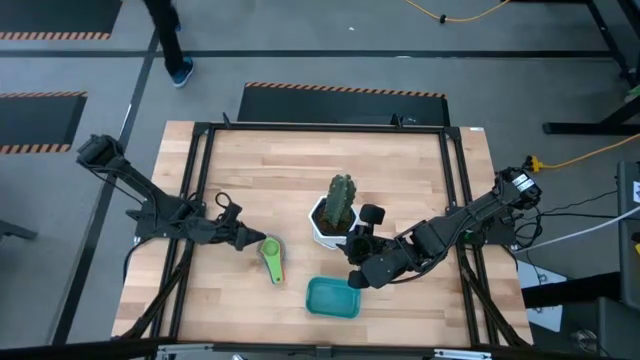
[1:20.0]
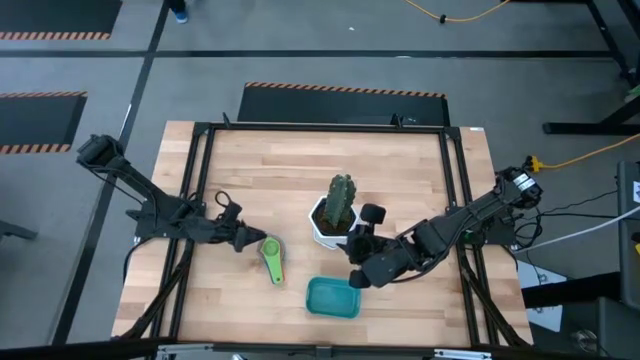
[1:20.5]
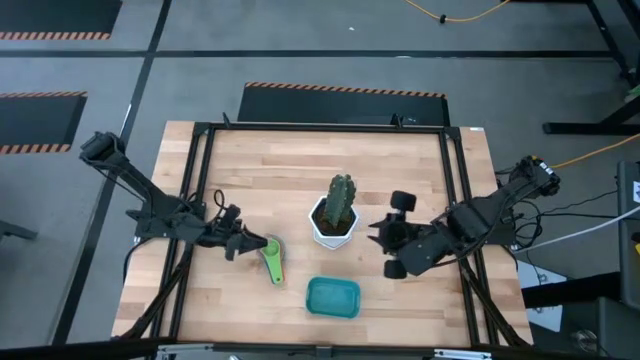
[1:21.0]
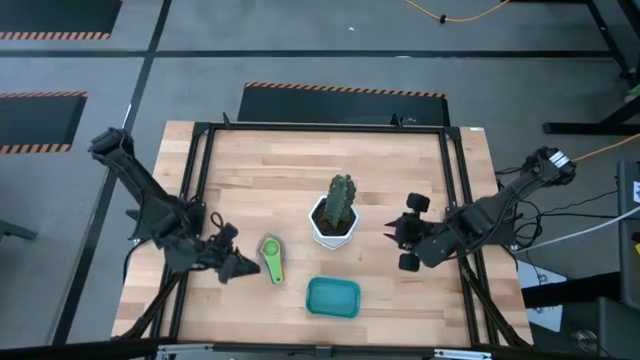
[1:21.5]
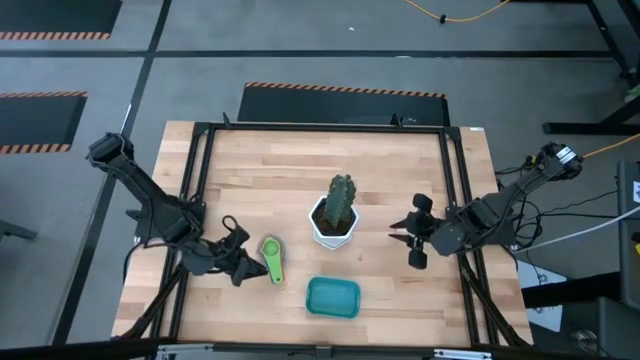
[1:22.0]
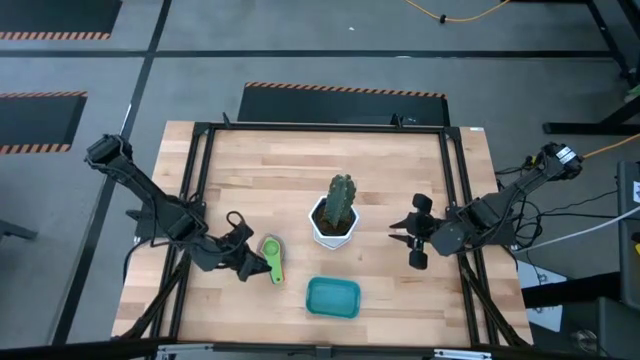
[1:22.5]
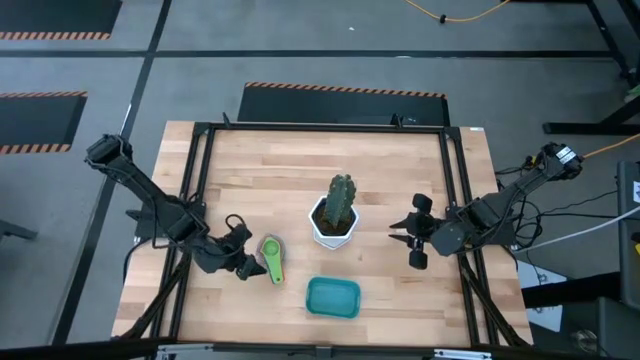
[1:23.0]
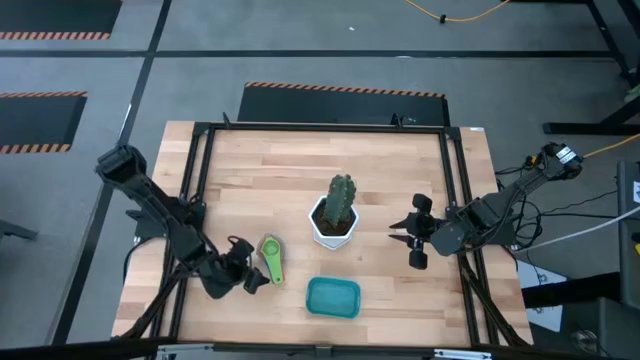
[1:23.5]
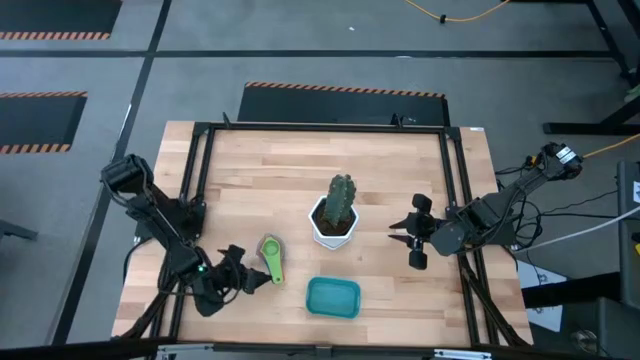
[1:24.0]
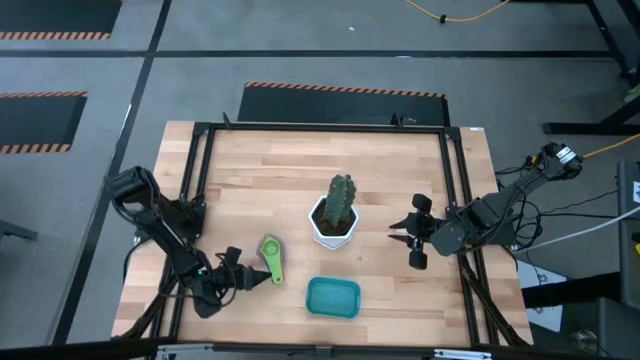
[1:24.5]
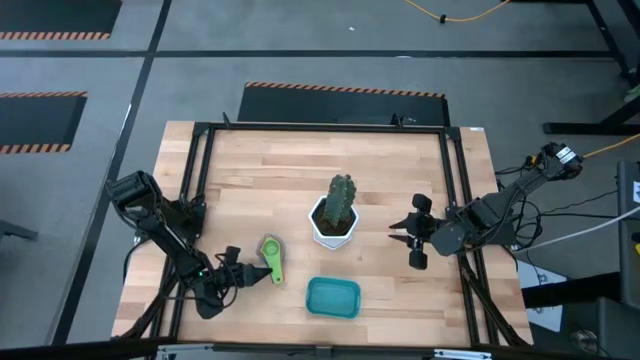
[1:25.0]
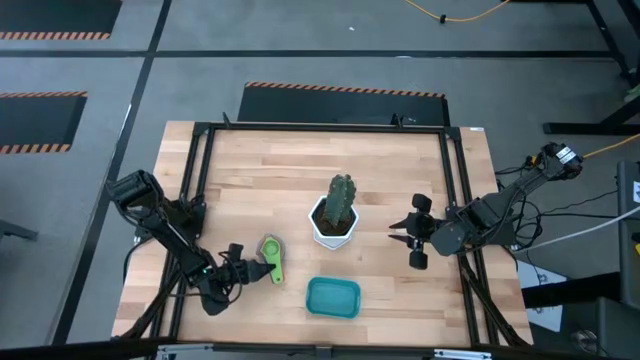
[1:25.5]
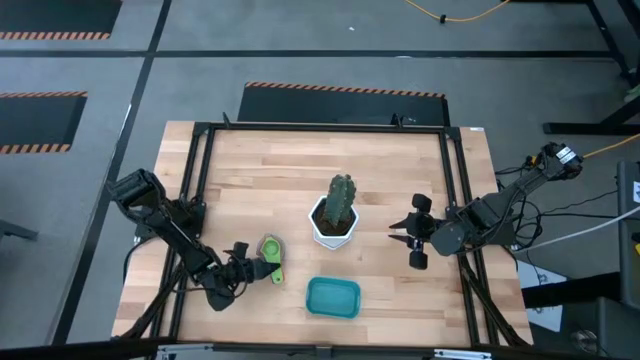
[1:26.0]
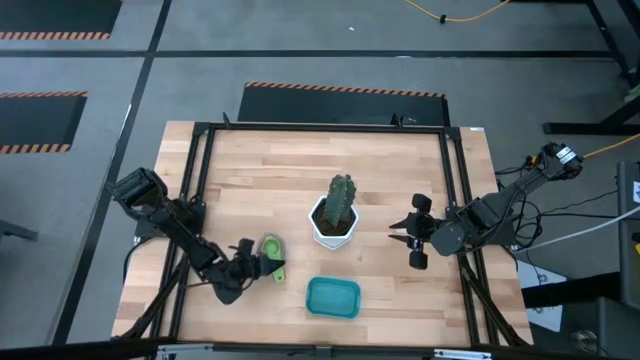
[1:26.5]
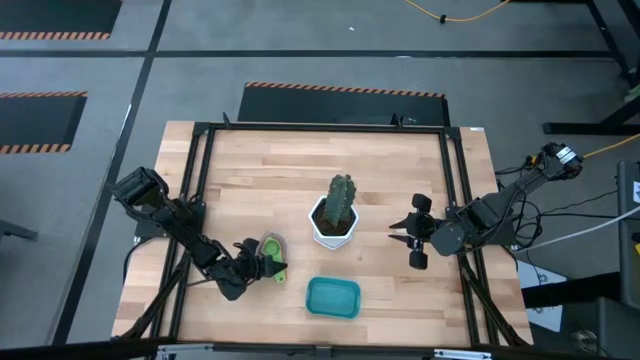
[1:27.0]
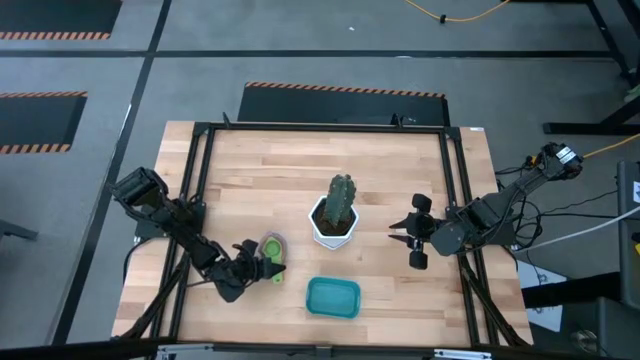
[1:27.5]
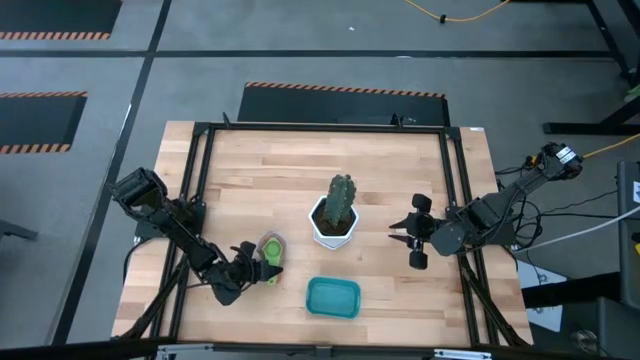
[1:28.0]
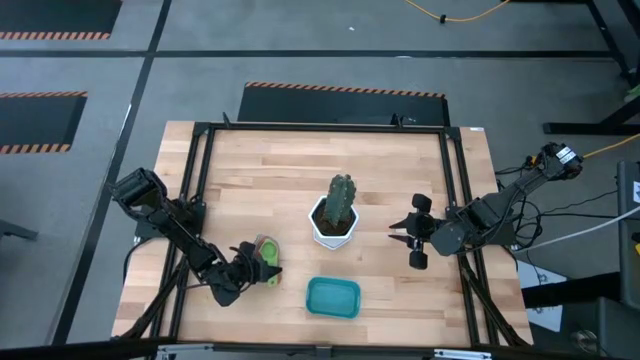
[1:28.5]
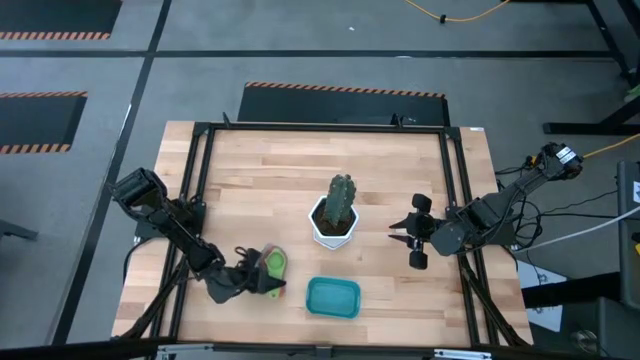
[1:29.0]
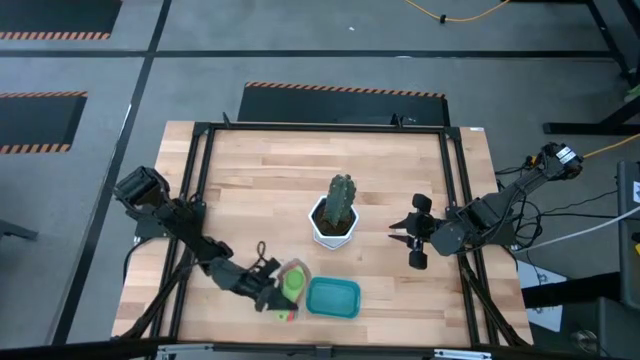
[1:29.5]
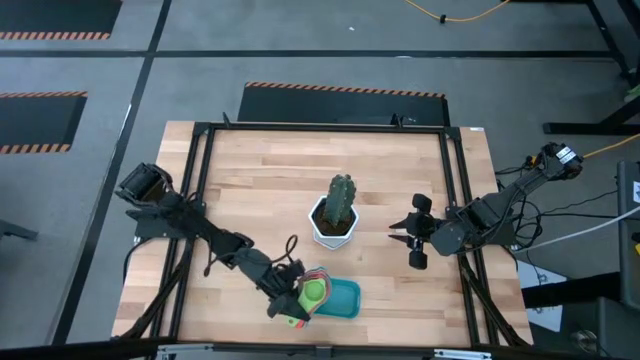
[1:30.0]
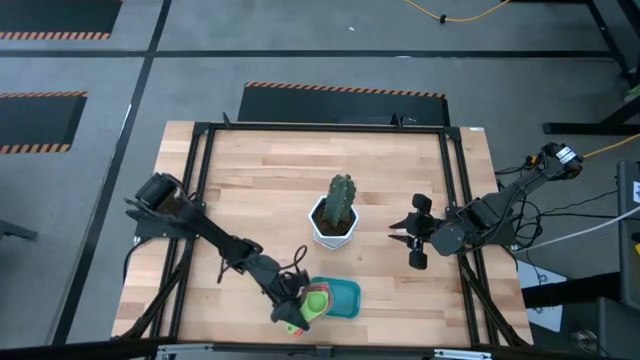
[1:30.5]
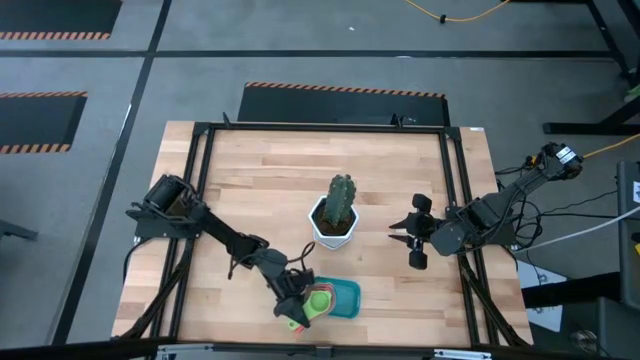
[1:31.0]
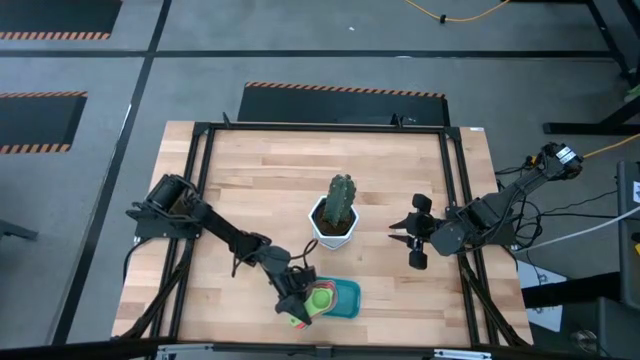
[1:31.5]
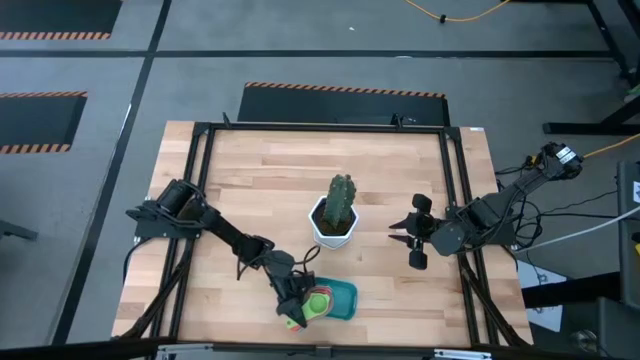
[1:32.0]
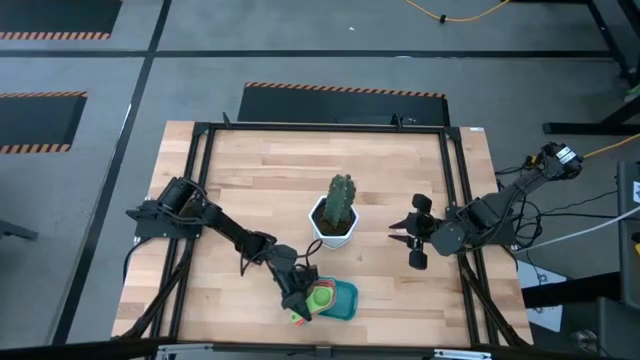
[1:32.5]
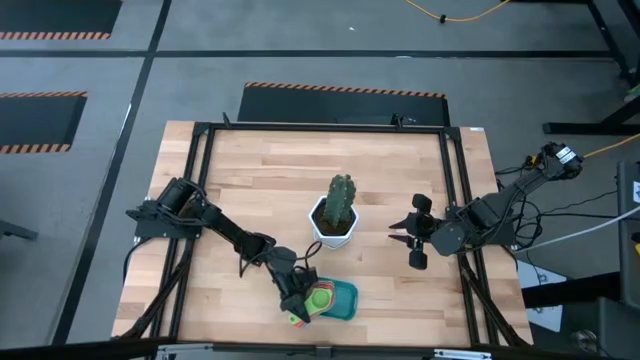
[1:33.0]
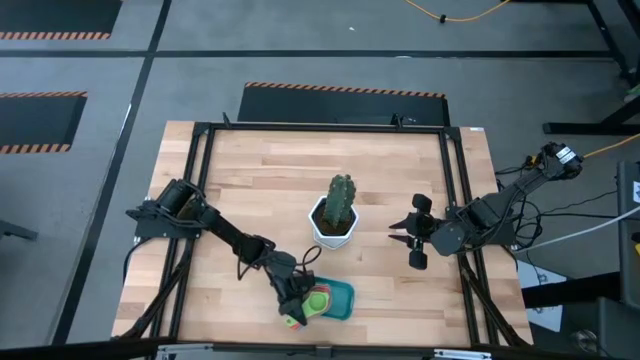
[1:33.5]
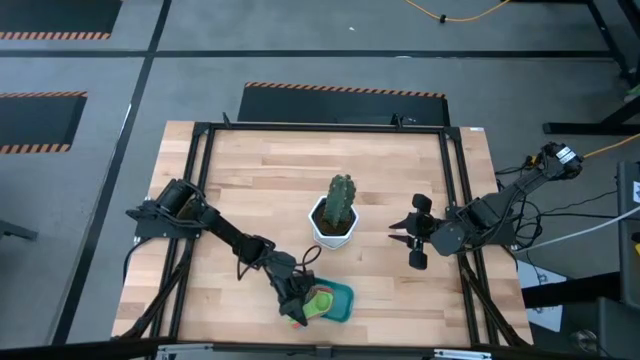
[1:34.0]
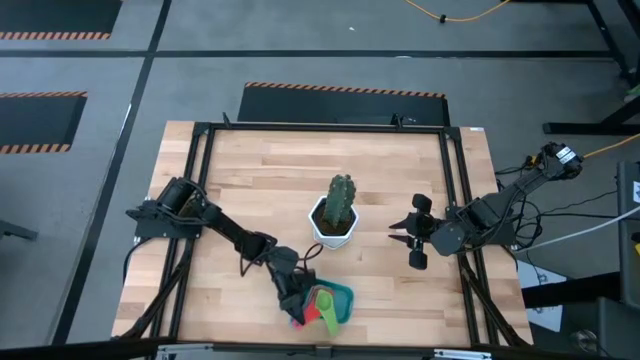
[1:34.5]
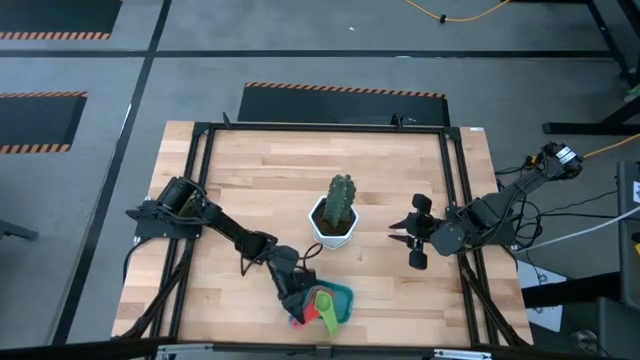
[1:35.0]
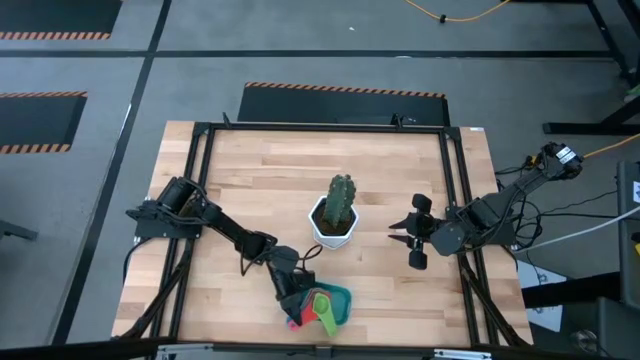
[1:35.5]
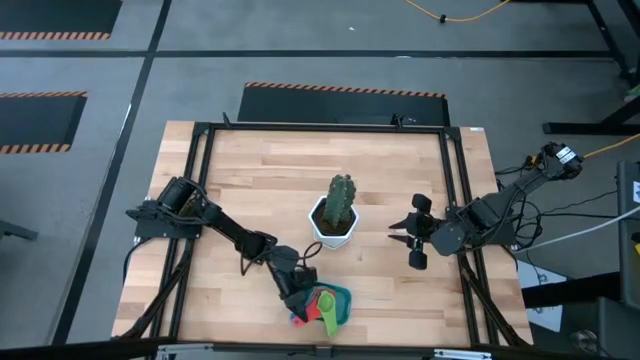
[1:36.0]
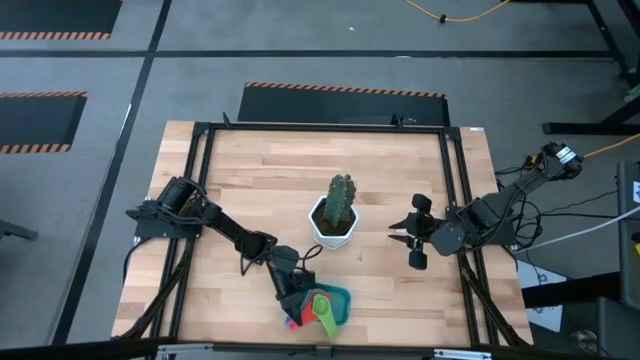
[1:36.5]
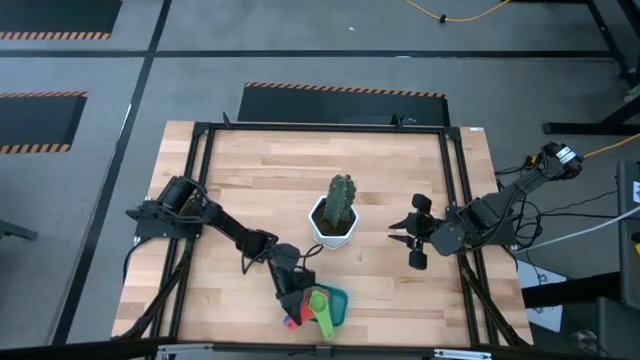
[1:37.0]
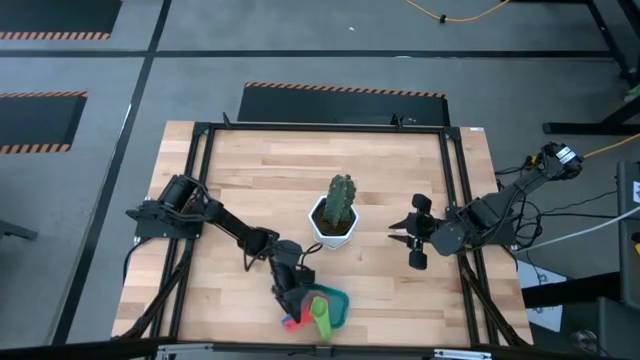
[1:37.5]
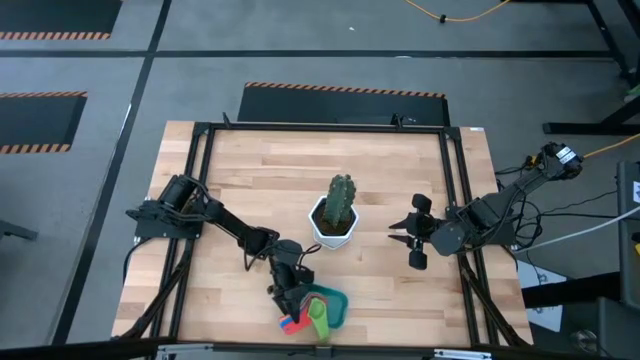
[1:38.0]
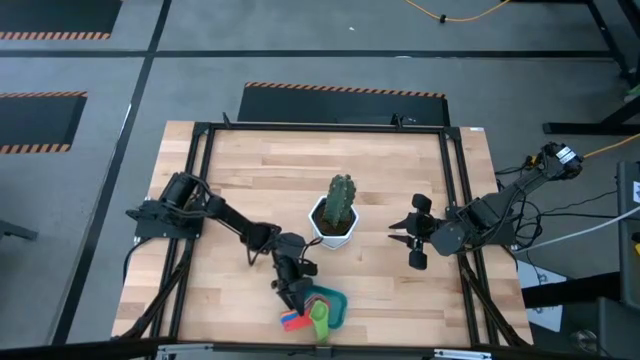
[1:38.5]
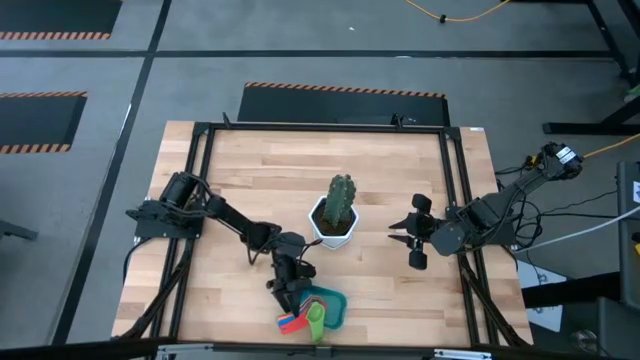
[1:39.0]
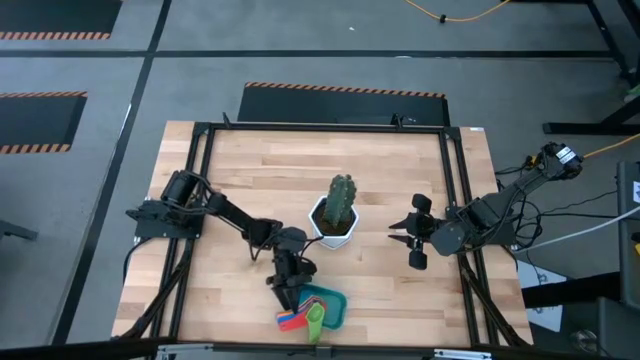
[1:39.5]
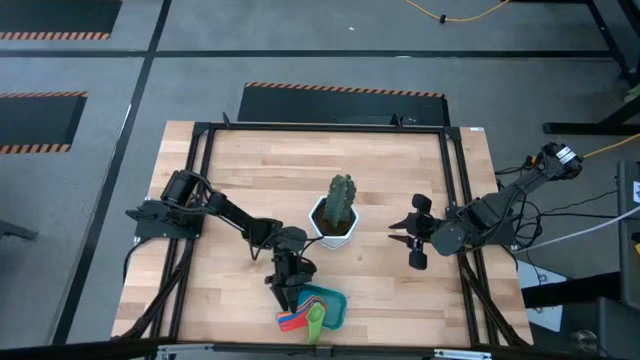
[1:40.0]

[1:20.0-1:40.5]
Task: Nest measuring cups in basket
Put the nested measuring cups into the green bin
